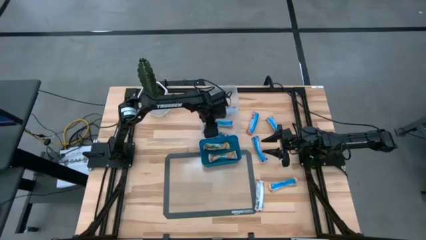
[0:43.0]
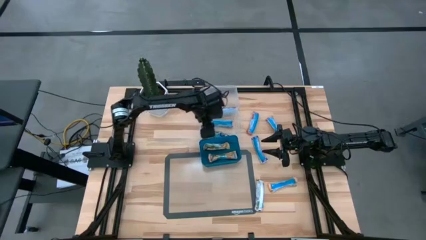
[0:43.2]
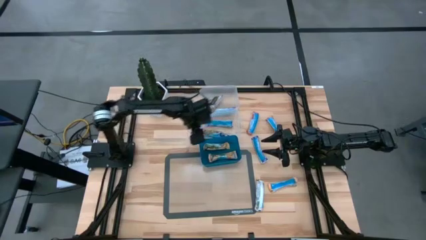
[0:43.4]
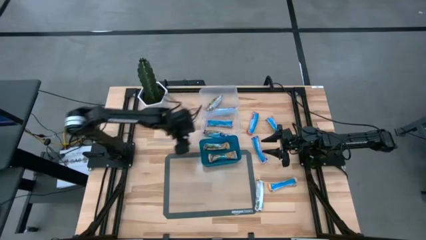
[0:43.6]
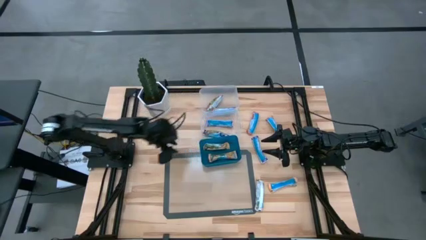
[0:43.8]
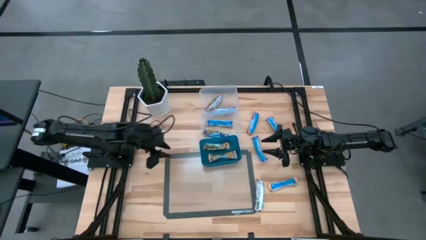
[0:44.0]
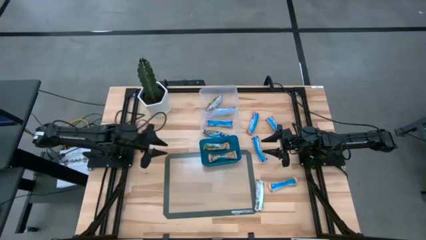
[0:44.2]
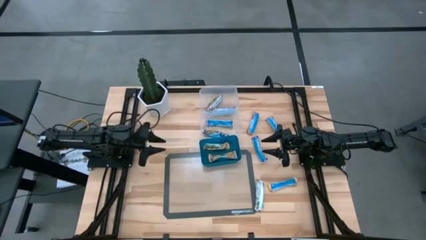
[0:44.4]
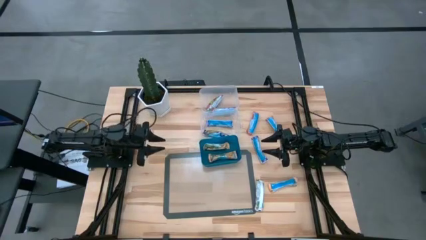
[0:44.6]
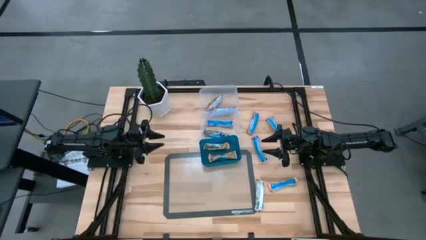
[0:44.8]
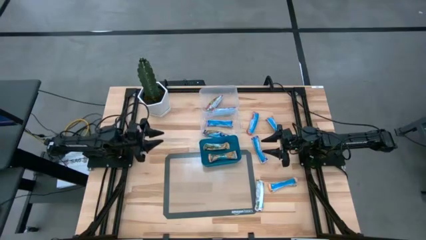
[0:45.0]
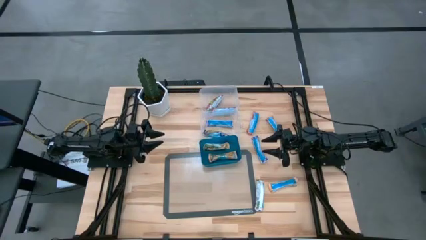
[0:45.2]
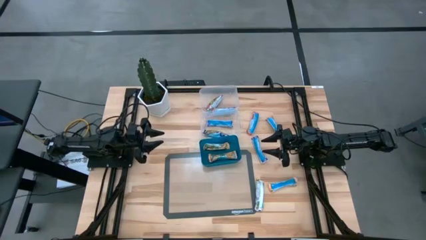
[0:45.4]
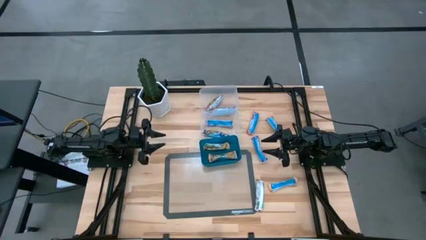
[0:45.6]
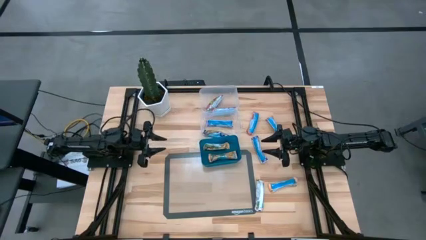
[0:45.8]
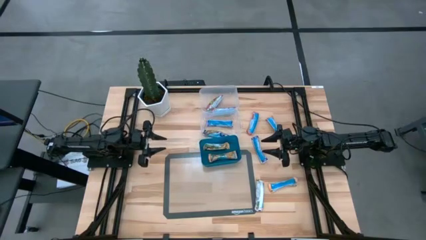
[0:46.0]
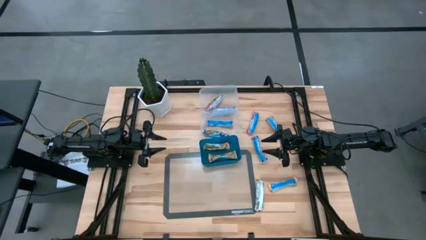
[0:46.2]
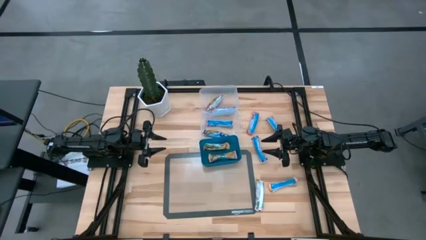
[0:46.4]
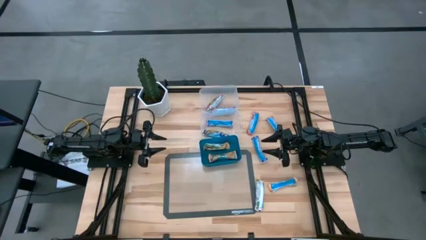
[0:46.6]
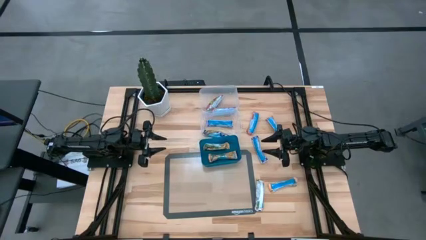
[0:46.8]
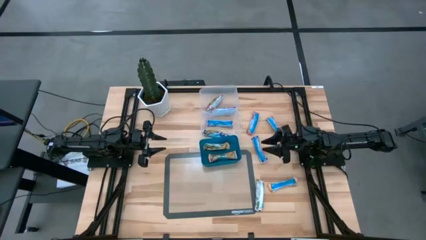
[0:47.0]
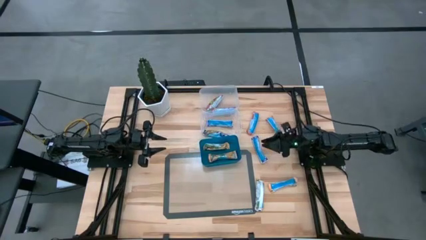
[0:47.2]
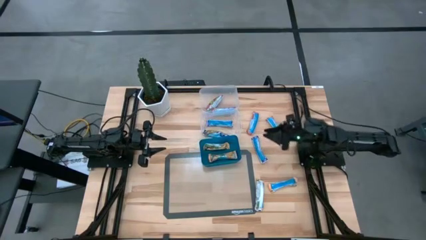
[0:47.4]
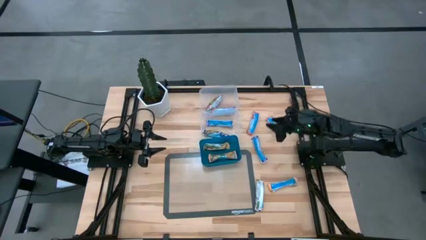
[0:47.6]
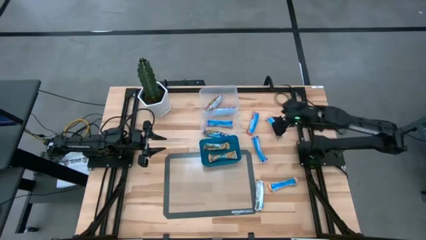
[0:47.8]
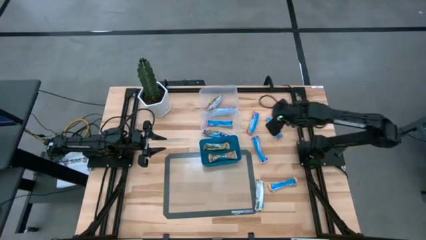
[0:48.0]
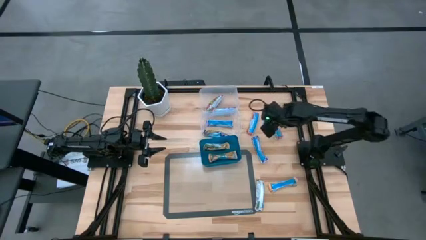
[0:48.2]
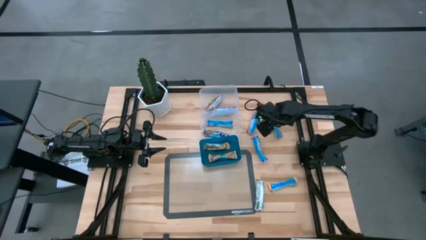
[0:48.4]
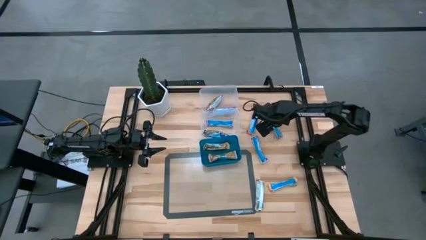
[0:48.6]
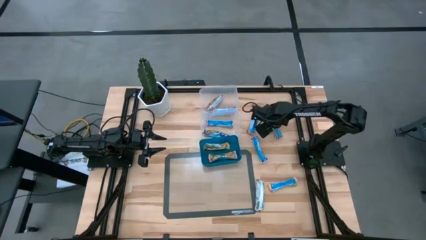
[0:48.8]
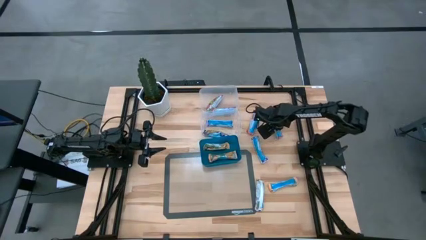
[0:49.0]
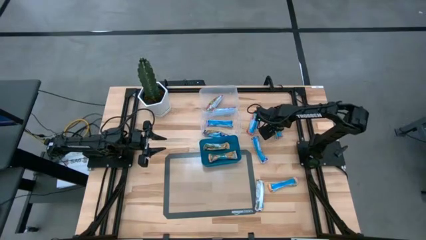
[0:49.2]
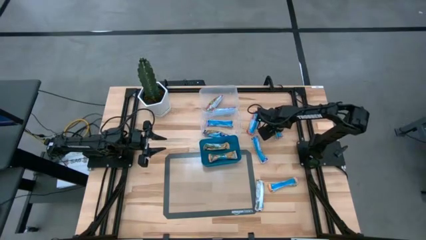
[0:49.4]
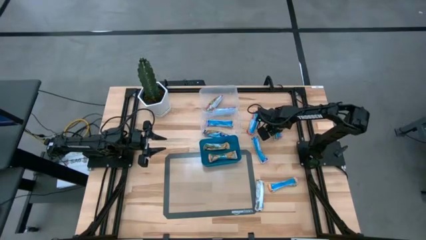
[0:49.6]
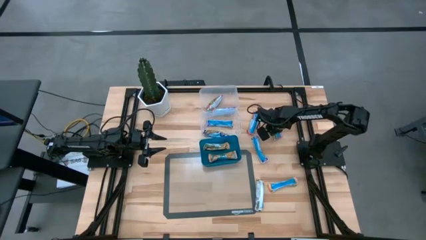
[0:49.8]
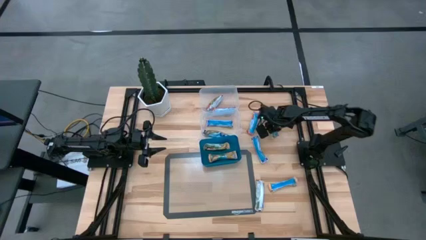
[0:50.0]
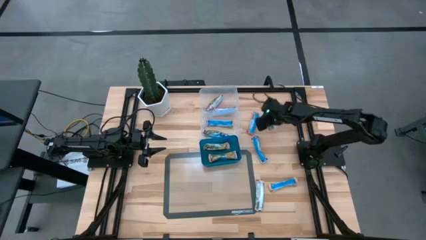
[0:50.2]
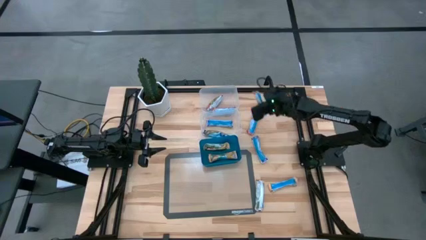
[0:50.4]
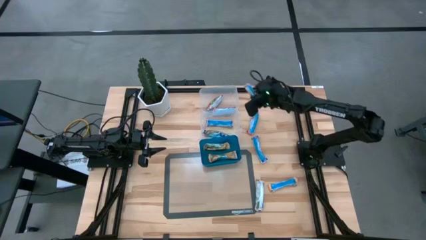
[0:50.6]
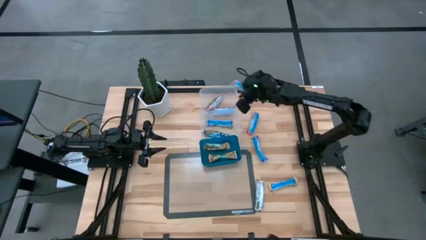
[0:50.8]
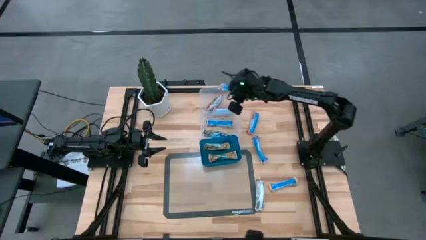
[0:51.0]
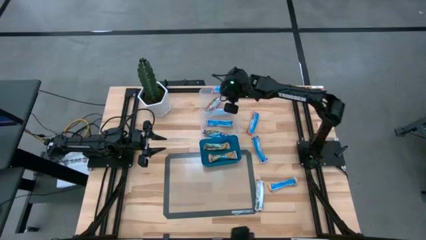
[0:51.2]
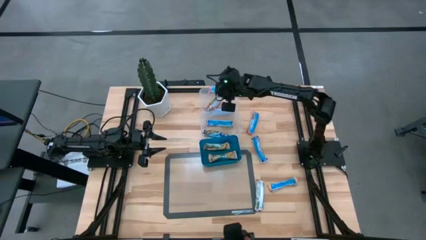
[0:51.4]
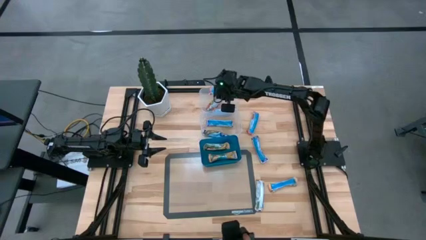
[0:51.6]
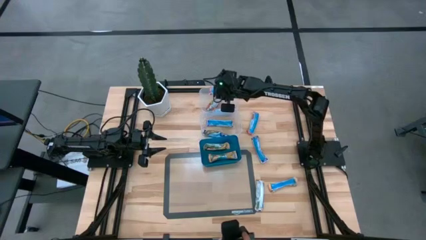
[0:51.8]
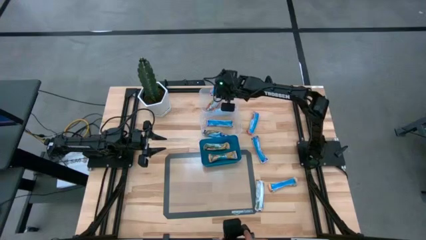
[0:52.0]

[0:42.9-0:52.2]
Task: Pick and place Granola Bars by type
Put the red granola bar into the top transparent bin

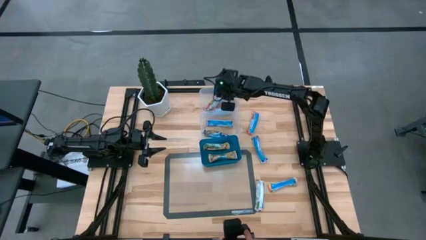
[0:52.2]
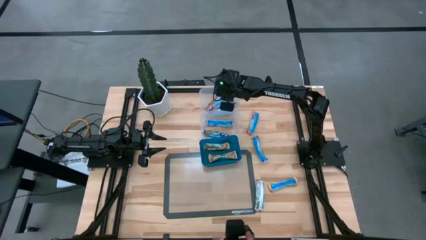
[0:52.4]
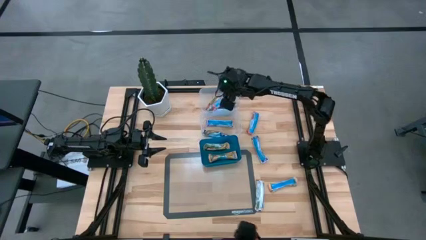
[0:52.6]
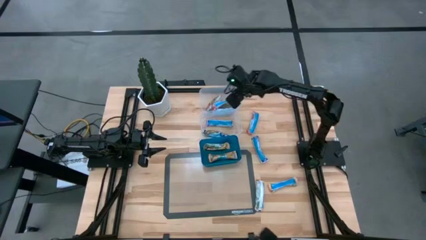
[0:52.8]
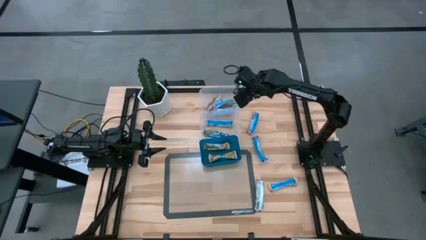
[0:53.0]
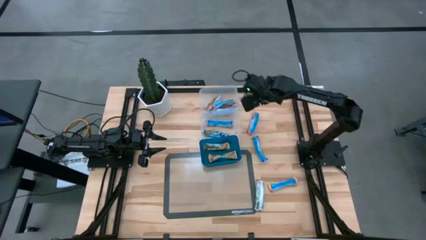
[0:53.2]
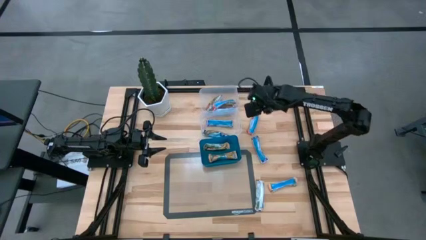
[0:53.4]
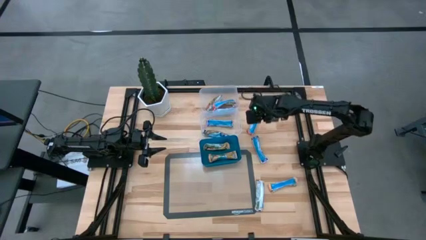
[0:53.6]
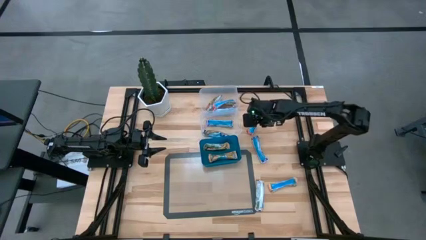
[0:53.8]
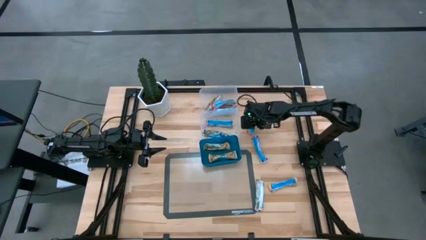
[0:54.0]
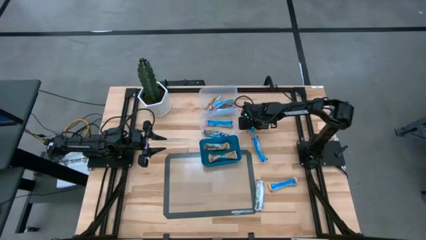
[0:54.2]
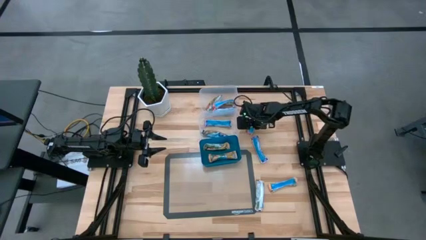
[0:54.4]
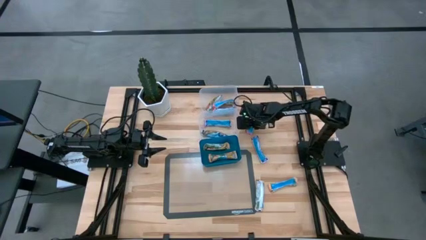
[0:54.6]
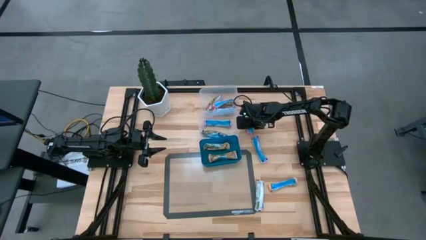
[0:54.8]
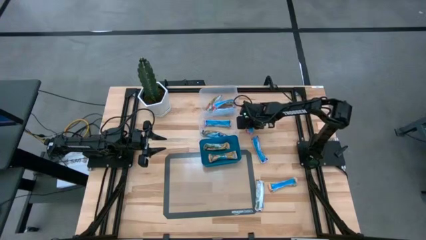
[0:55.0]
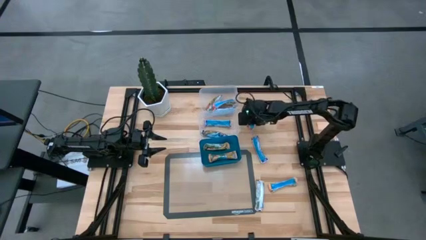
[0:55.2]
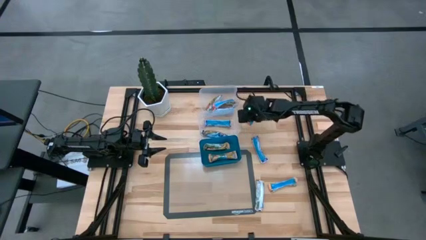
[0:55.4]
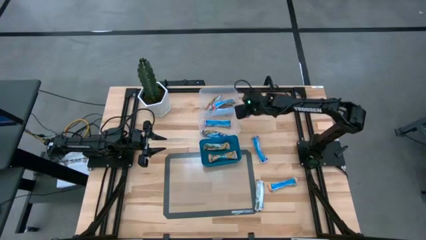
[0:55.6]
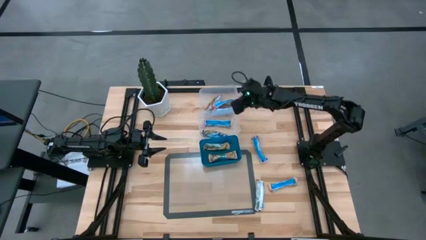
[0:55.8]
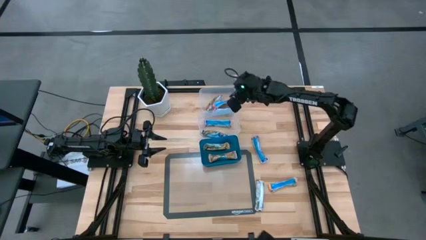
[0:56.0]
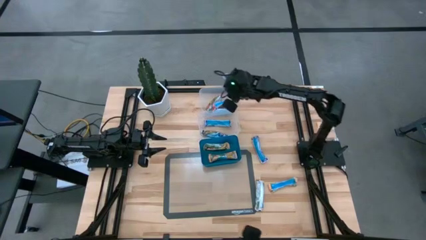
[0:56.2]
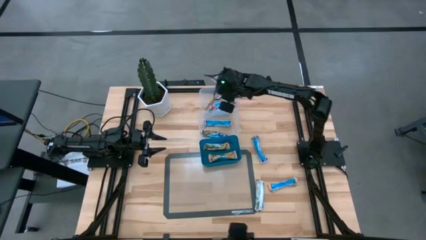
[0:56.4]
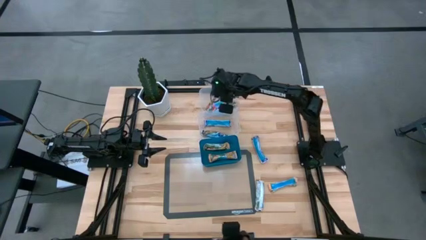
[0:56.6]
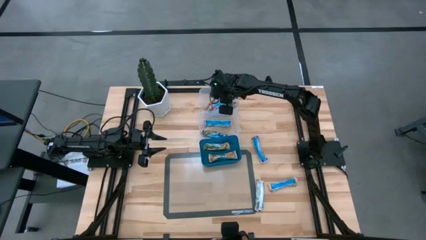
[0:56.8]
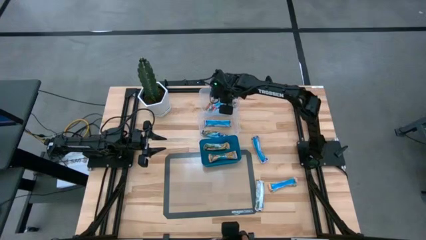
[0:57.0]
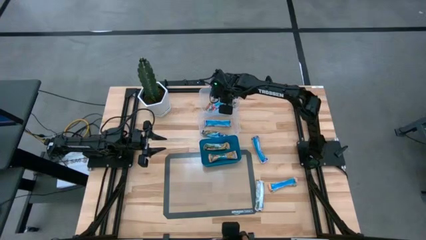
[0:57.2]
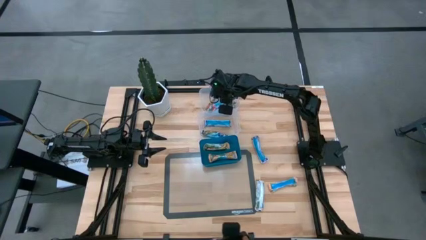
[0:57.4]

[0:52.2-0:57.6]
Put the red granola bar into the top transparent bin

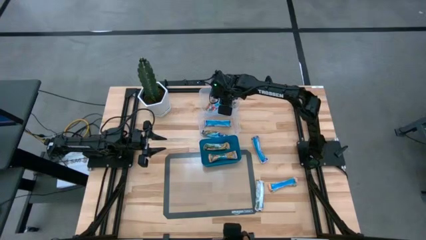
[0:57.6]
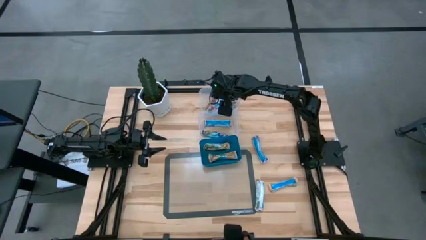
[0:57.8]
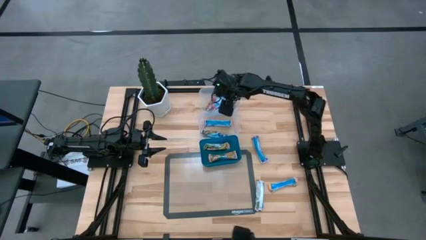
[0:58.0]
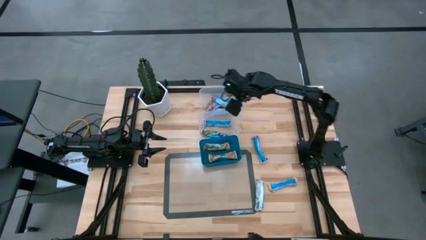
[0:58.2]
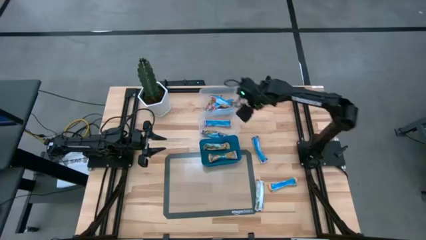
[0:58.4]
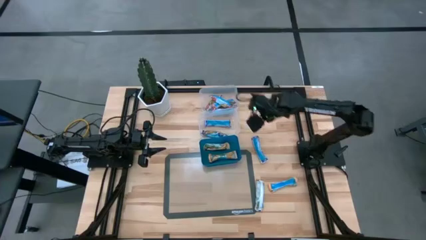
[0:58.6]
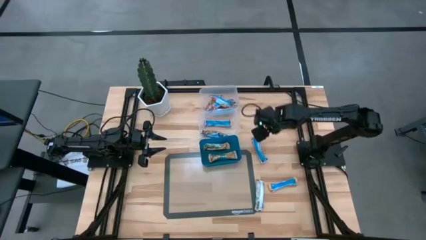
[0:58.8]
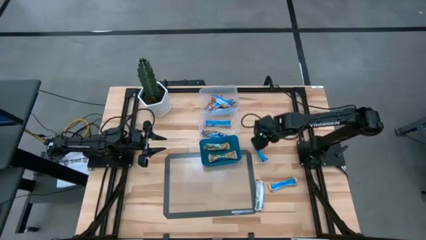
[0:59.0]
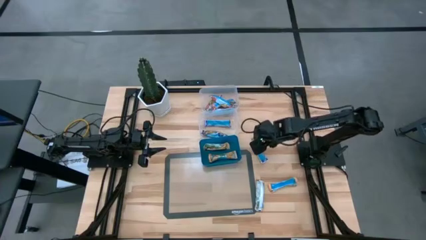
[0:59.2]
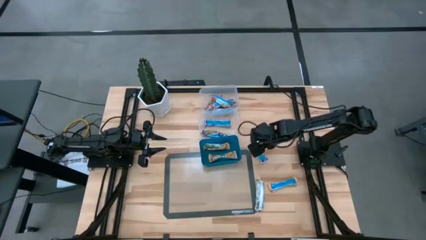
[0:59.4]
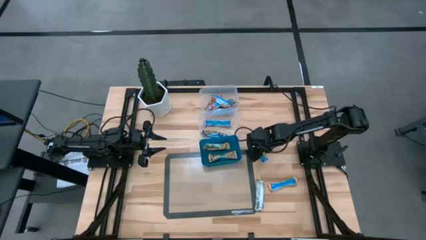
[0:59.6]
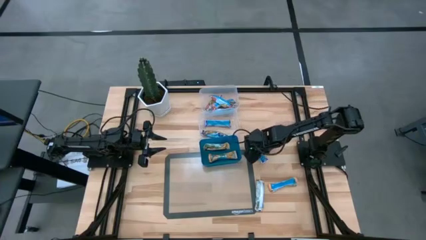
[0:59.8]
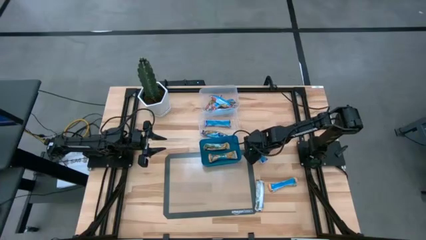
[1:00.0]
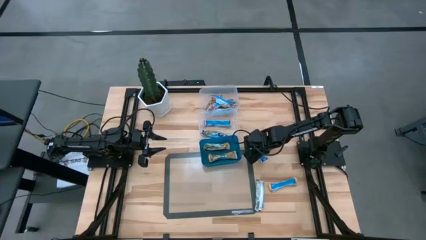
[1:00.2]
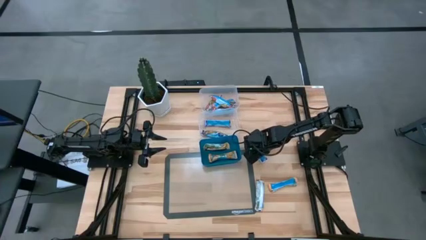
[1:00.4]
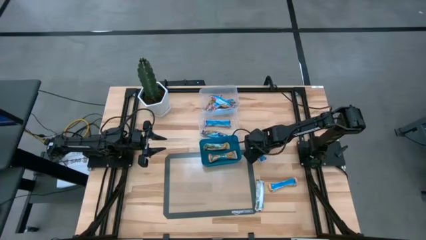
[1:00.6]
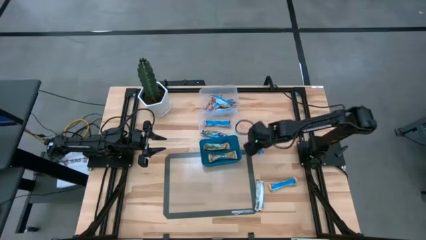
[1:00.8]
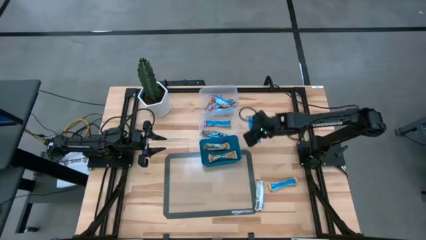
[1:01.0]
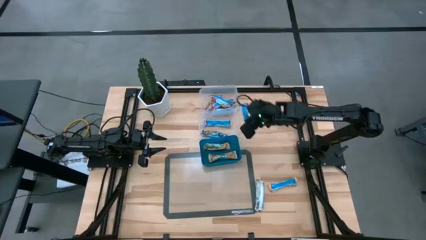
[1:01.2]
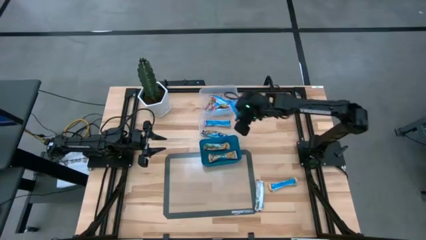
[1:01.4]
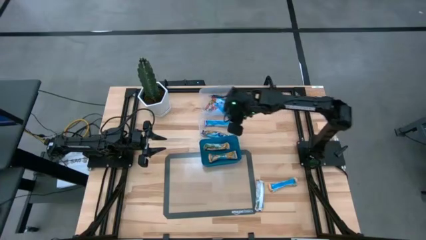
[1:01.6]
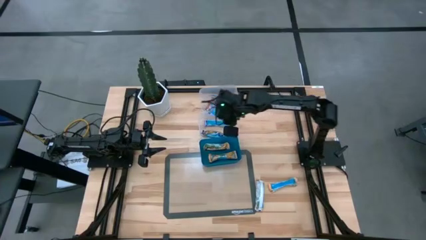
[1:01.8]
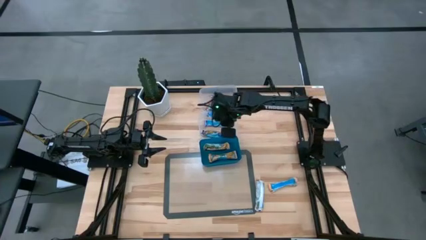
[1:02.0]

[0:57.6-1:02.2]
Put the blue granola bar into the bottom transparent bin
